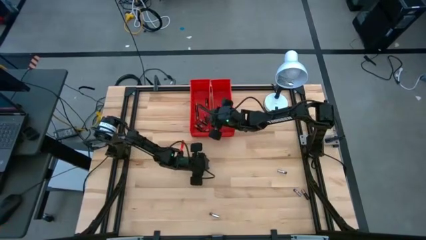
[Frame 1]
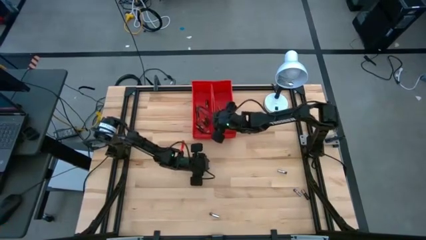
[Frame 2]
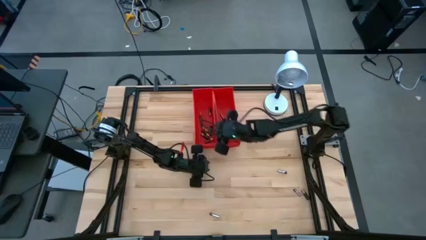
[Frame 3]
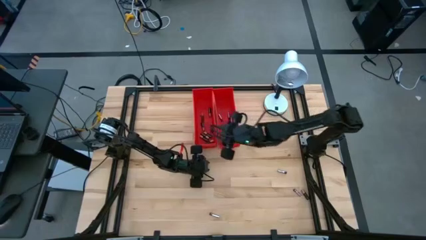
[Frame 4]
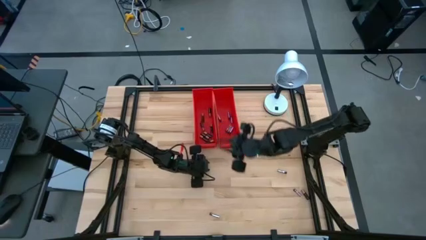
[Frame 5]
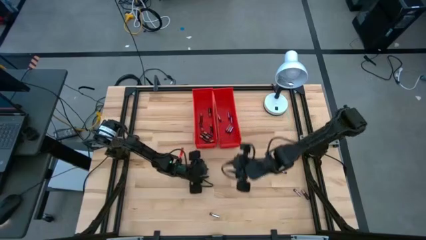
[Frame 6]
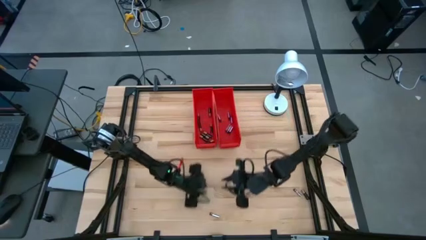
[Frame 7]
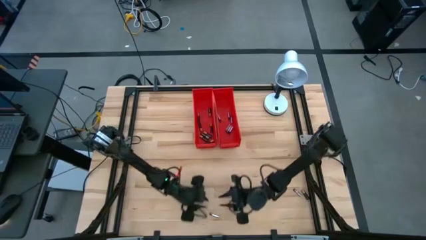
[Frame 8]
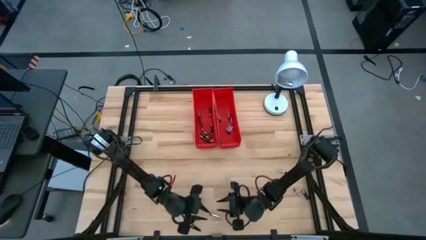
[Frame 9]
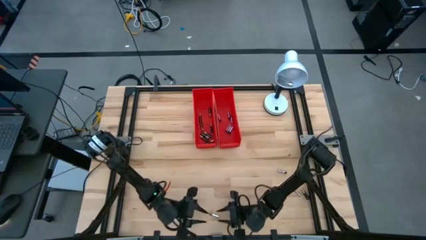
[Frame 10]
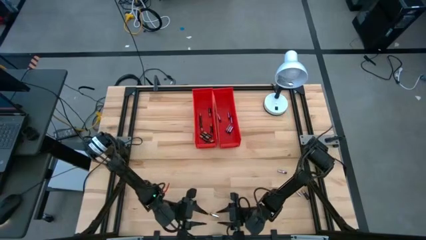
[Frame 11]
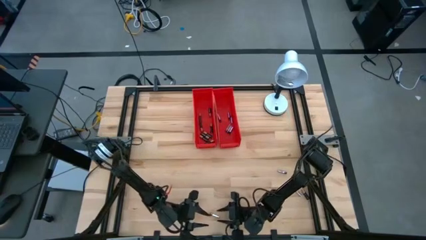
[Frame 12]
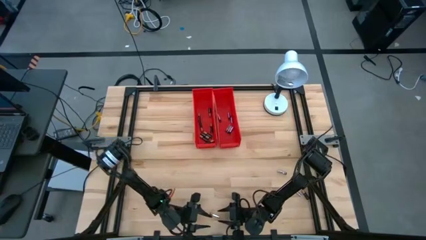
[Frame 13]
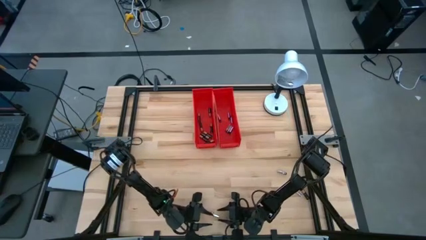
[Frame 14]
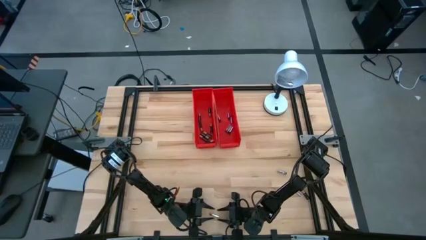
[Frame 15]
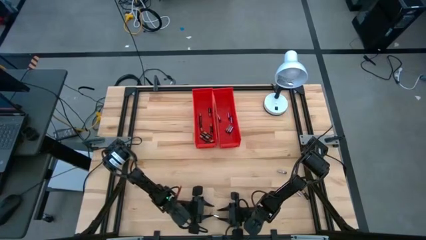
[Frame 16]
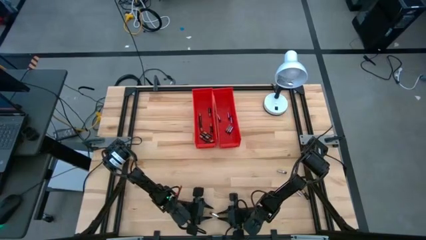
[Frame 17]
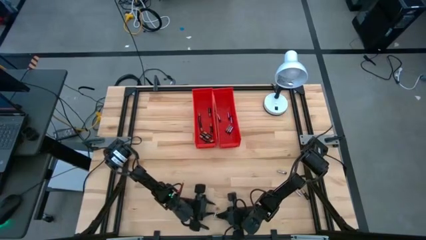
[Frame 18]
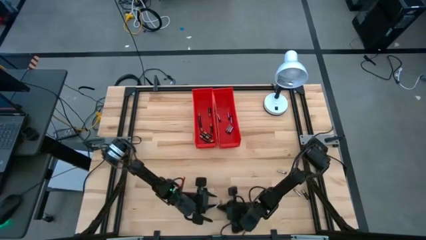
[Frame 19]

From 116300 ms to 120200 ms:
Task: Sort batteries
Put the silver battery into the right red bin

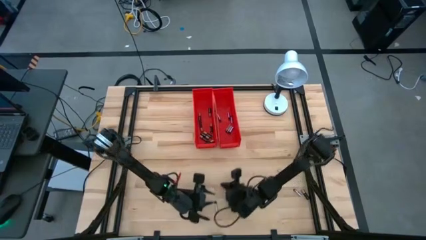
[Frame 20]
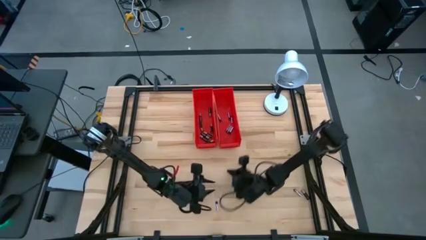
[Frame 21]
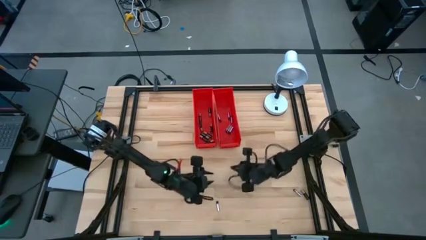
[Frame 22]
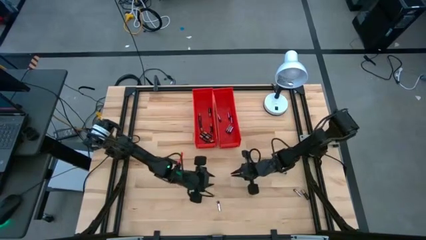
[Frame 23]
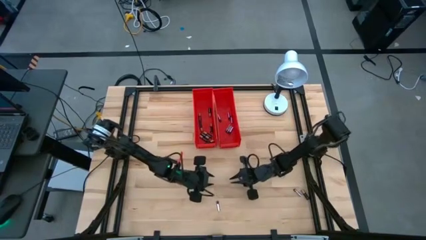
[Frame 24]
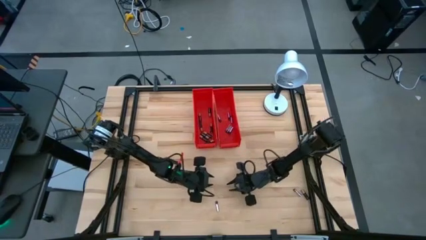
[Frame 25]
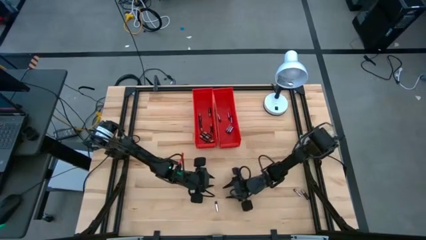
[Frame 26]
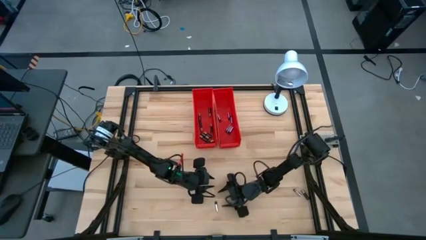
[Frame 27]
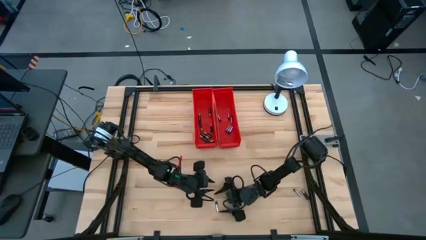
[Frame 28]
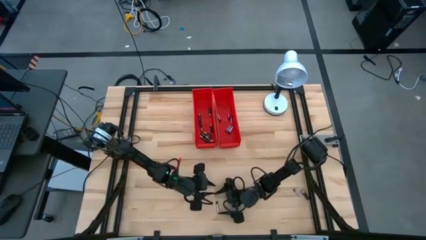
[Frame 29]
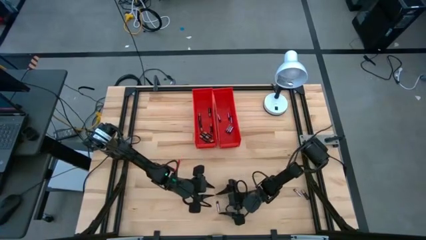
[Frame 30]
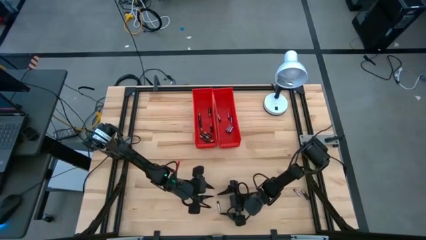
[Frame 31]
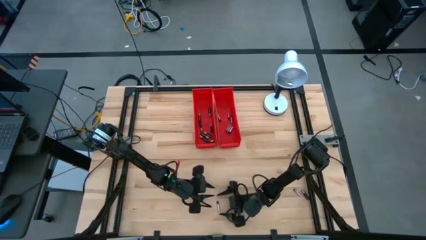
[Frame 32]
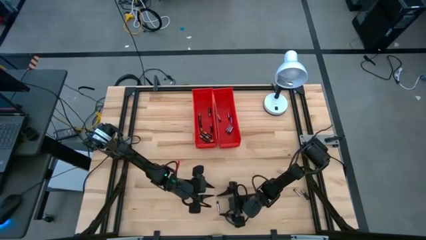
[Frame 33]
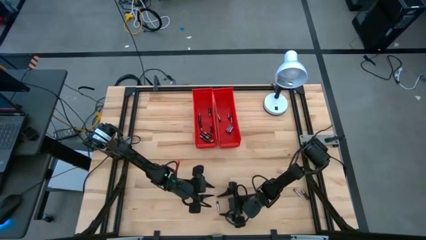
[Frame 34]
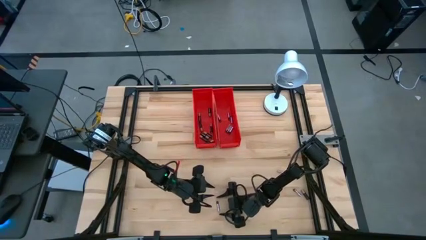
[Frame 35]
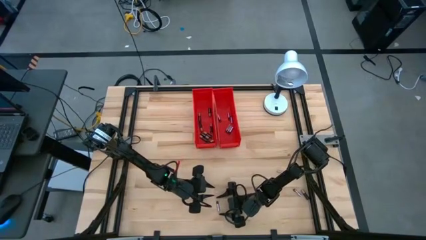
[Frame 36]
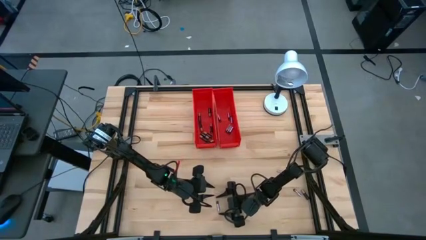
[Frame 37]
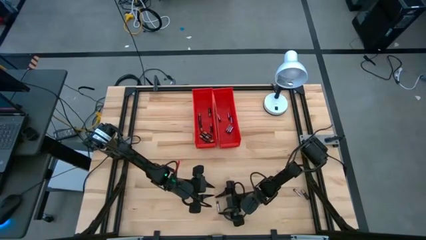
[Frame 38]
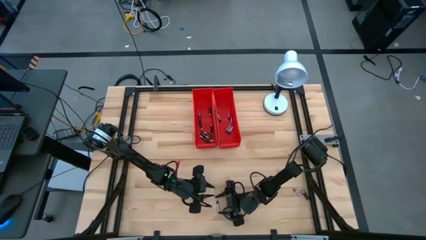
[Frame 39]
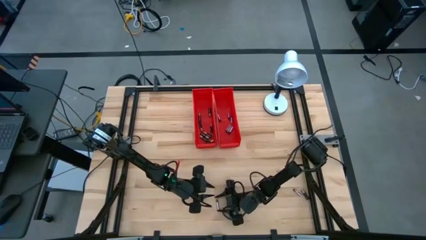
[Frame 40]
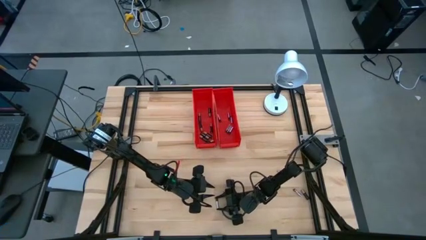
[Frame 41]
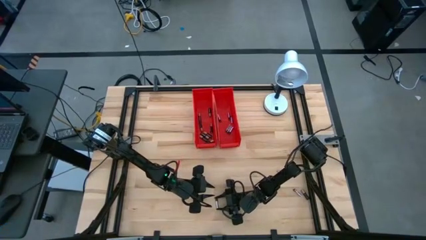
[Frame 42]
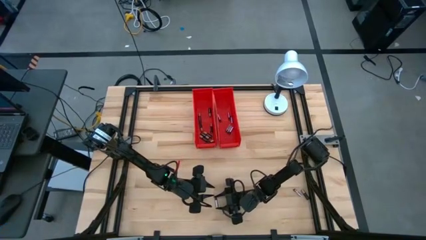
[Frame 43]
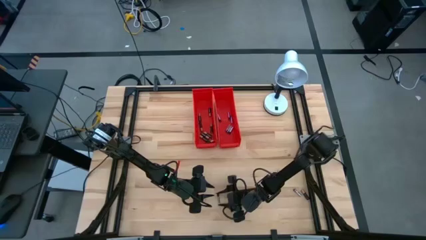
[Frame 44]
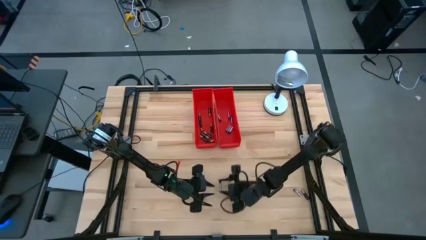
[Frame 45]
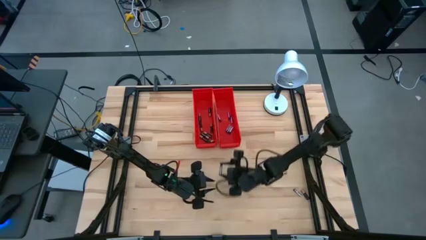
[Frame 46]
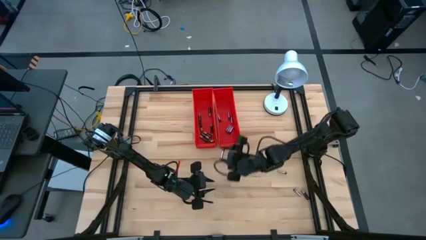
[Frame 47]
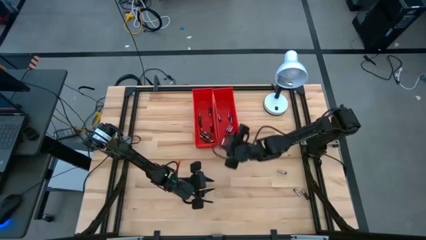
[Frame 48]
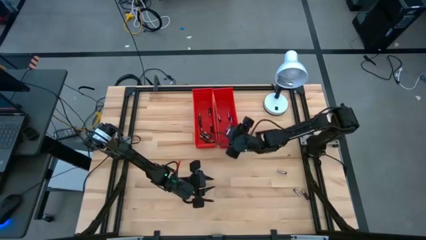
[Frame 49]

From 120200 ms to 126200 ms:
Put the silver battery into the right red bin

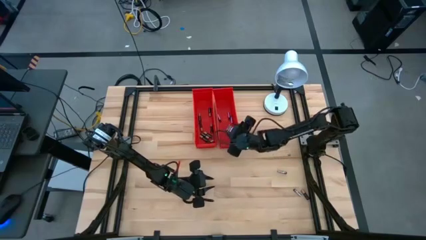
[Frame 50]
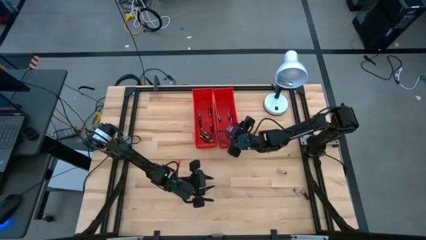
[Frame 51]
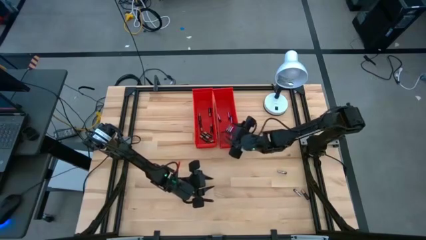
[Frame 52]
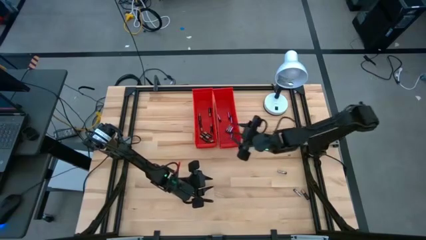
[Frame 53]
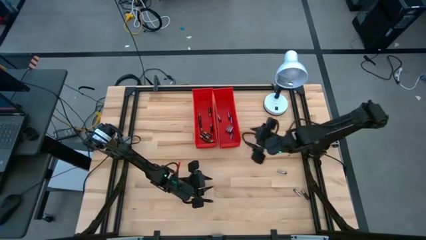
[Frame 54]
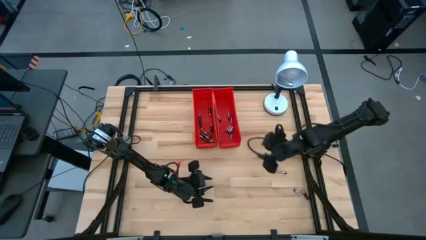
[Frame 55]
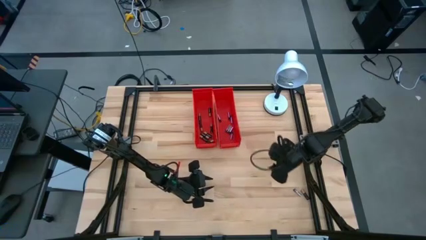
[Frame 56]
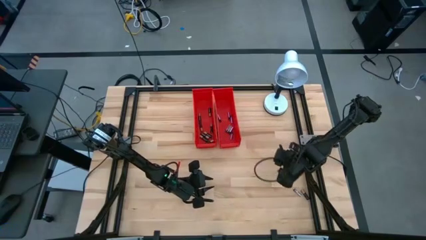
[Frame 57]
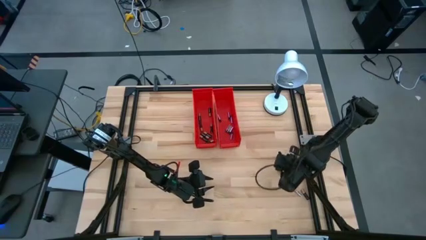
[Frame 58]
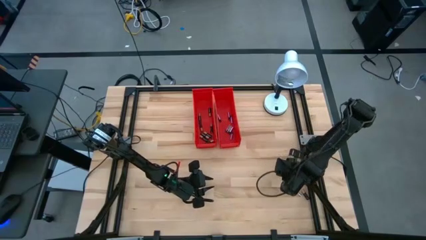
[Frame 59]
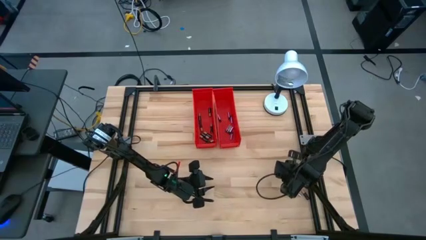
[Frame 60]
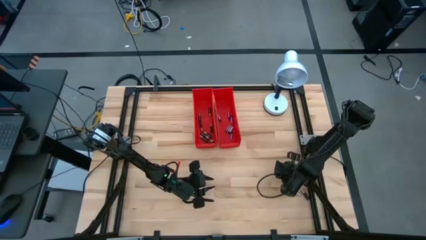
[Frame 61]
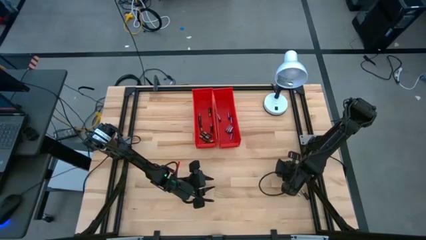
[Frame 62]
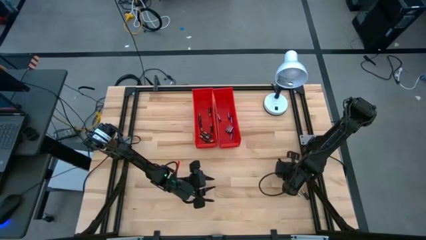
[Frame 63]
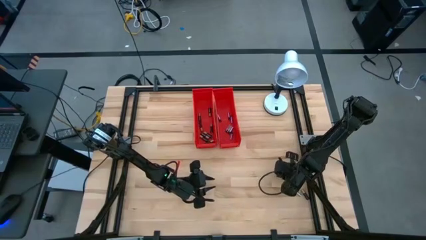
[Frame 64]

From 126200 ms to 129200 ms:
Put the silver battery into the right red bin

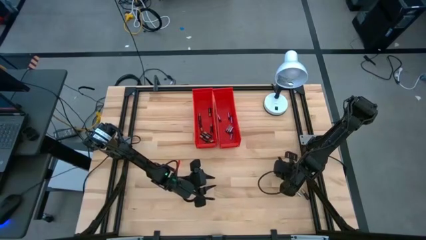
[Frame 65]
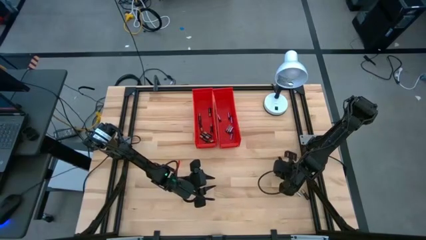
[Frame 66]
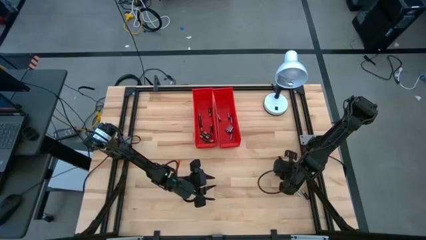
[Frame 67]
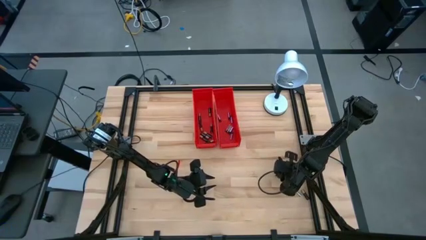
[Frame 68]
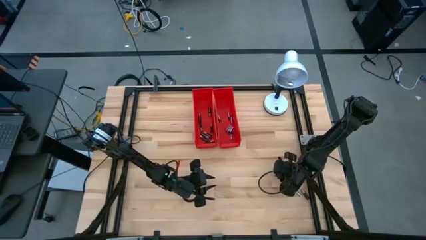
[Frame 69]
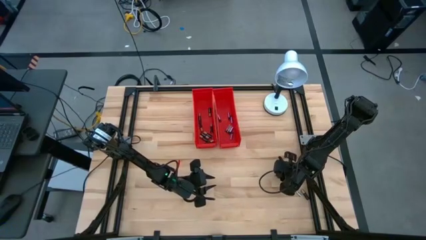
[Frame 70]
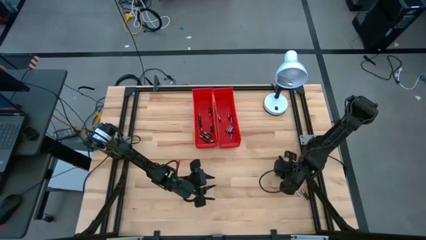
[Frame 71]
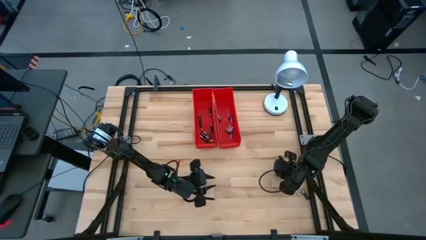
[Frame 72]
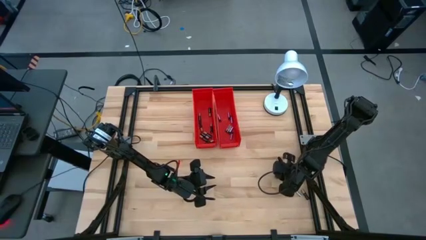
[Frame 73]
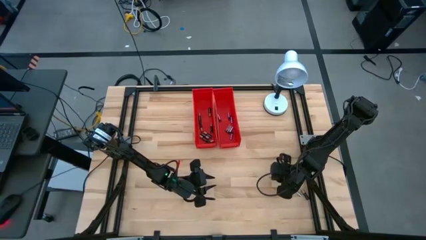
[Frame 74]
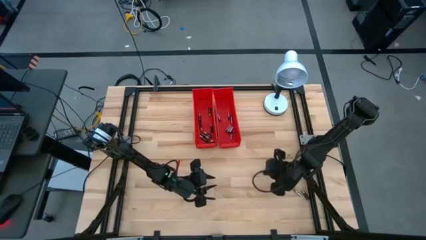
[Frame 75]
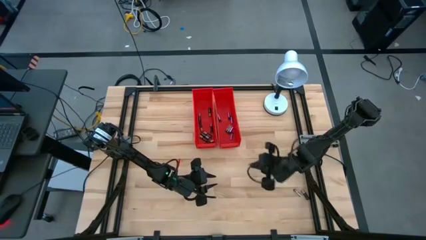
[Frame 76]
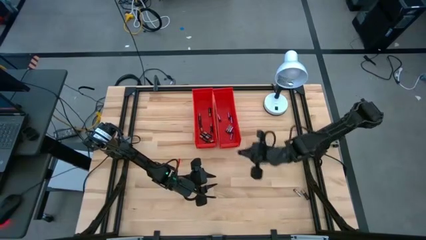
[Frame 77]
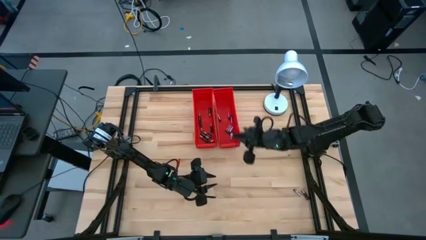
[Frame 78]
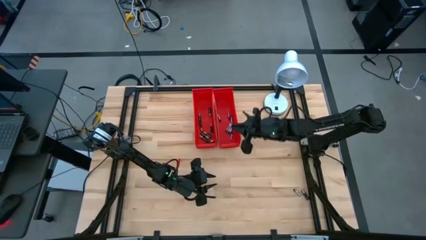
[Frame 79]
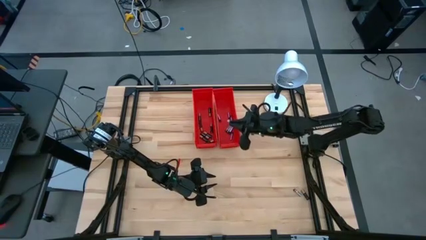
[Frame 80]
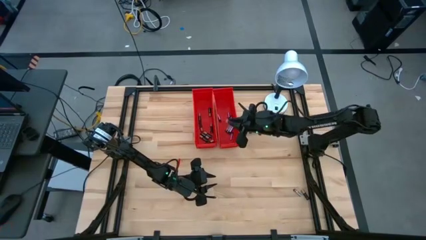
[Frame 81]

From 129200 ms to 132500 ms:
Put the silver battery into the right red bin
